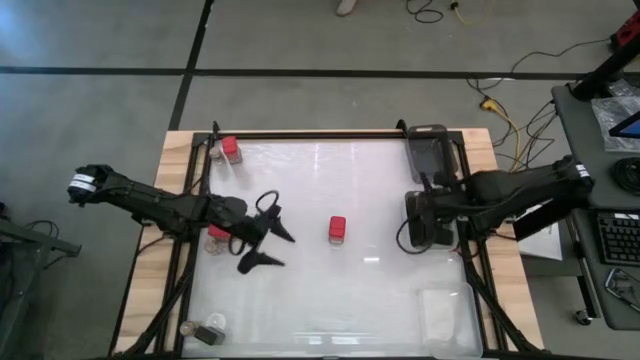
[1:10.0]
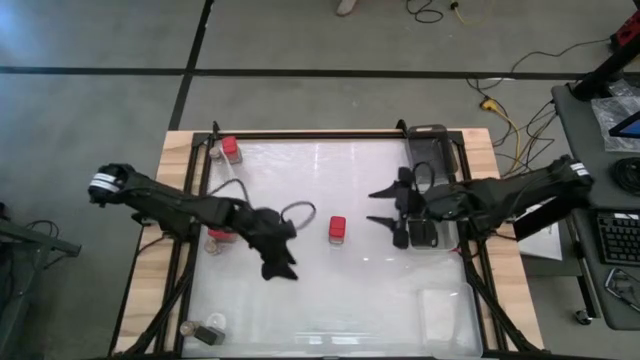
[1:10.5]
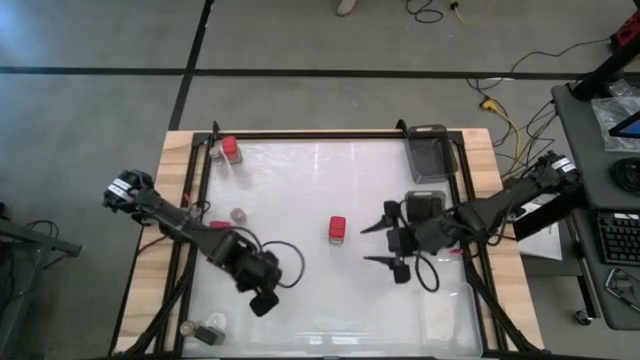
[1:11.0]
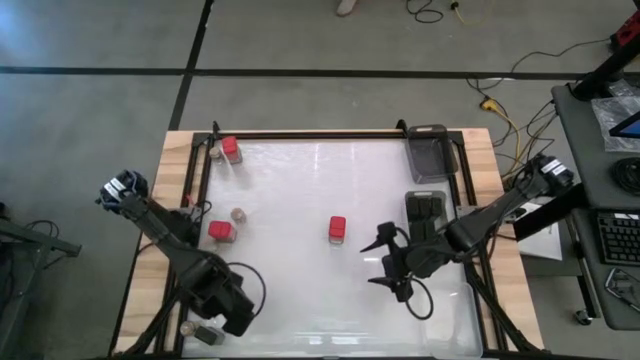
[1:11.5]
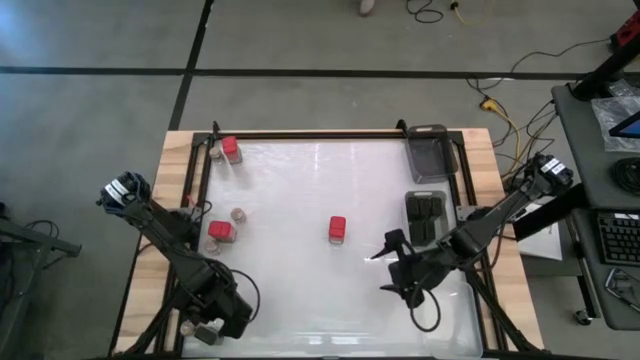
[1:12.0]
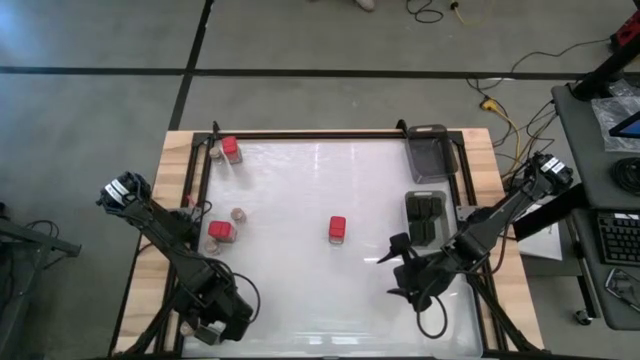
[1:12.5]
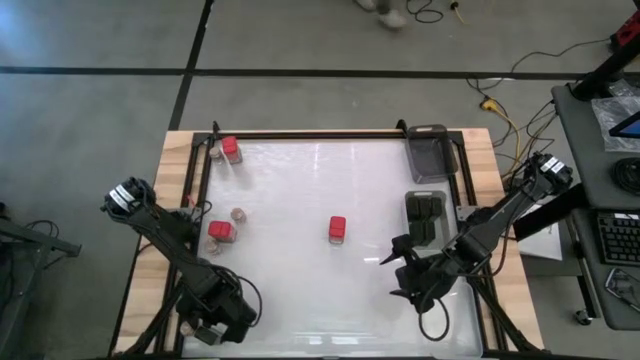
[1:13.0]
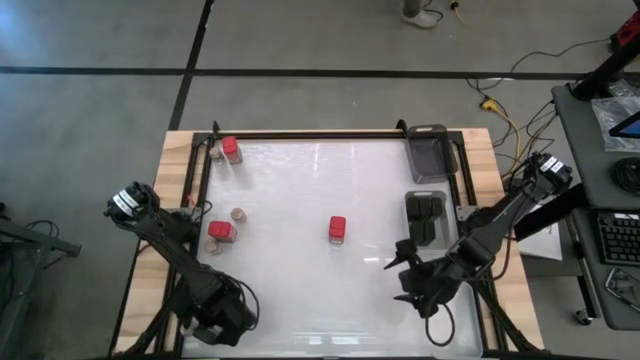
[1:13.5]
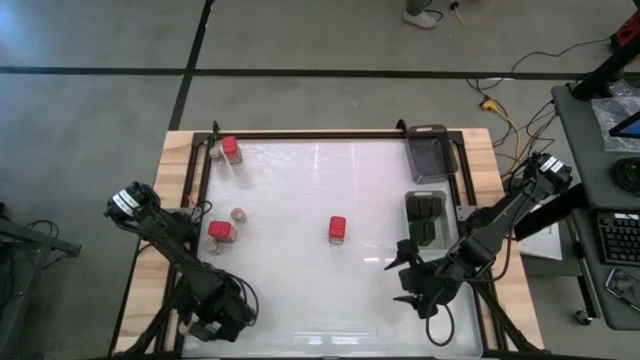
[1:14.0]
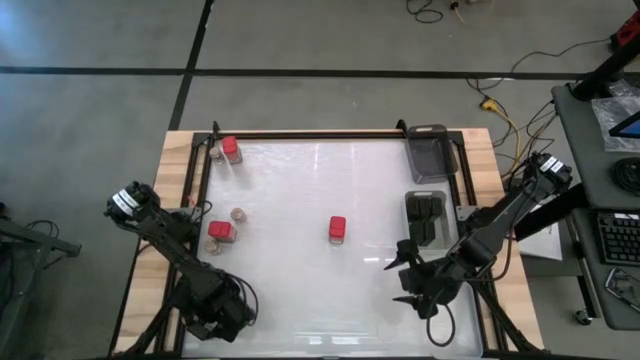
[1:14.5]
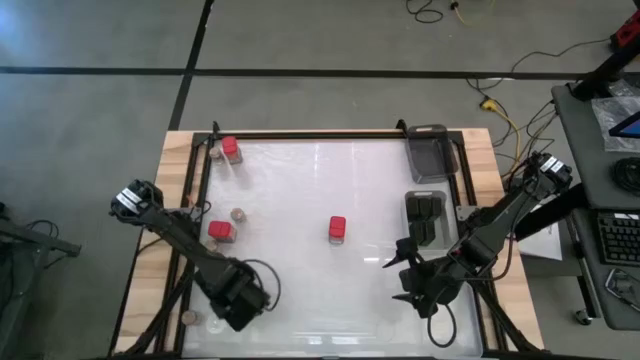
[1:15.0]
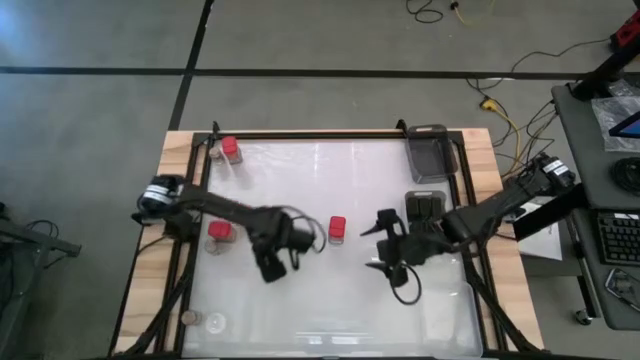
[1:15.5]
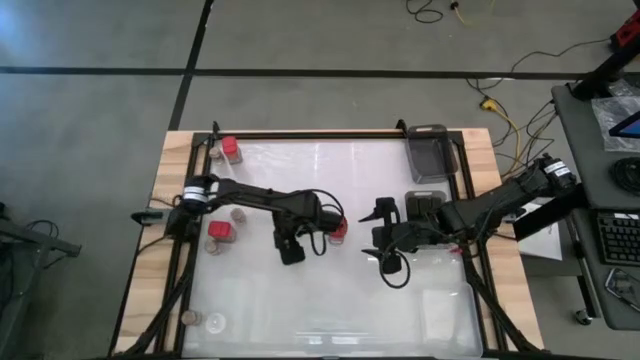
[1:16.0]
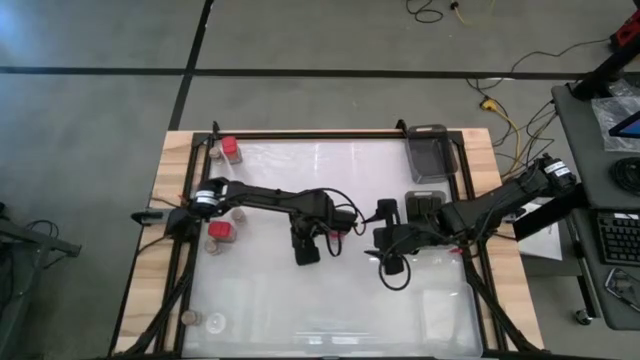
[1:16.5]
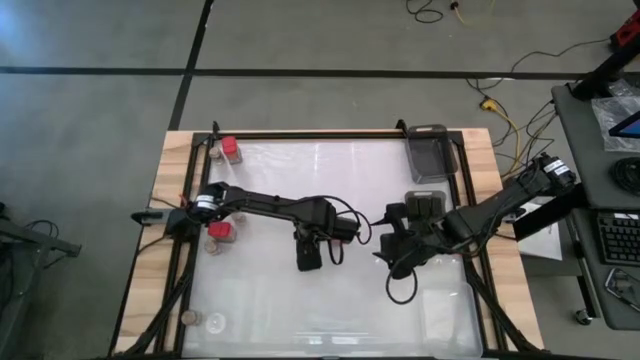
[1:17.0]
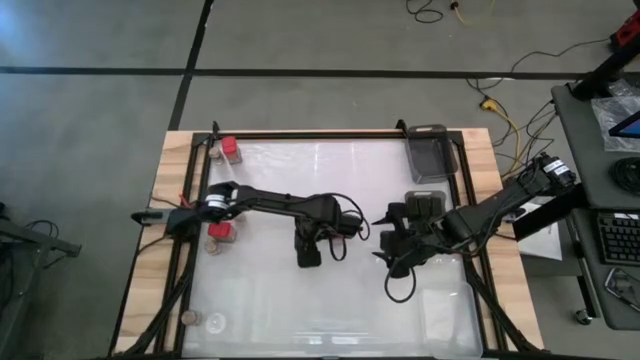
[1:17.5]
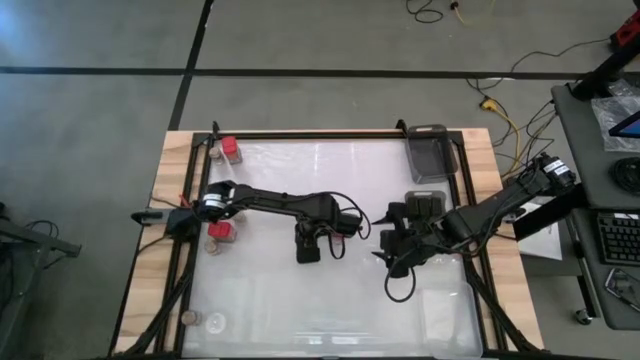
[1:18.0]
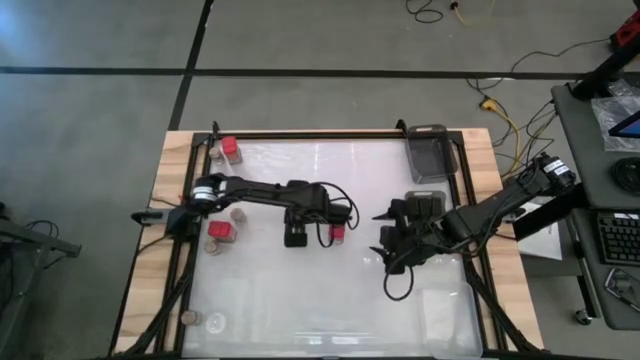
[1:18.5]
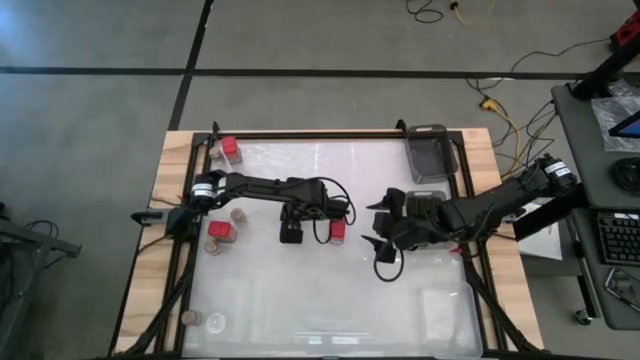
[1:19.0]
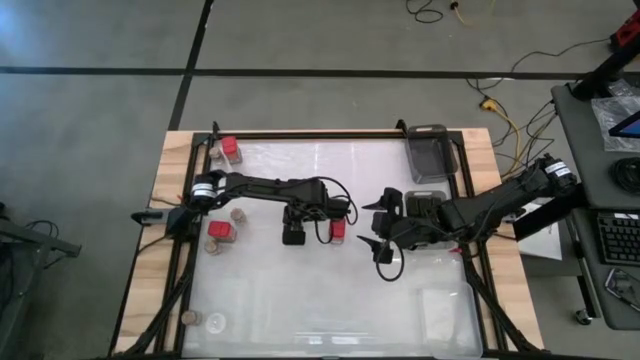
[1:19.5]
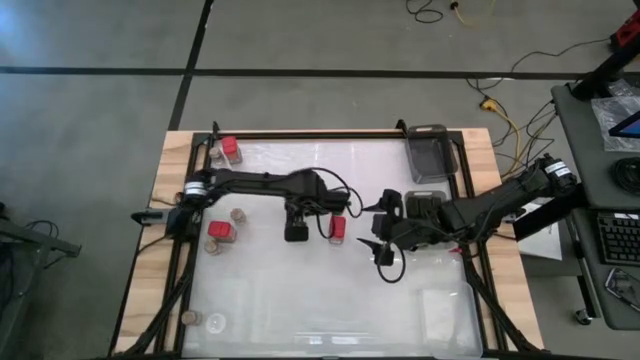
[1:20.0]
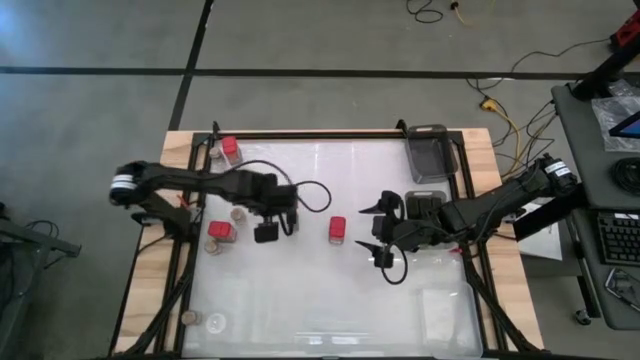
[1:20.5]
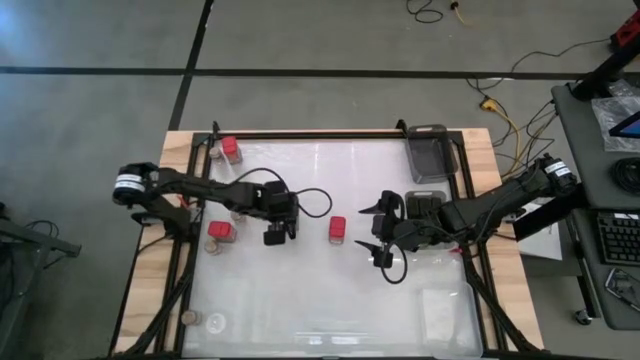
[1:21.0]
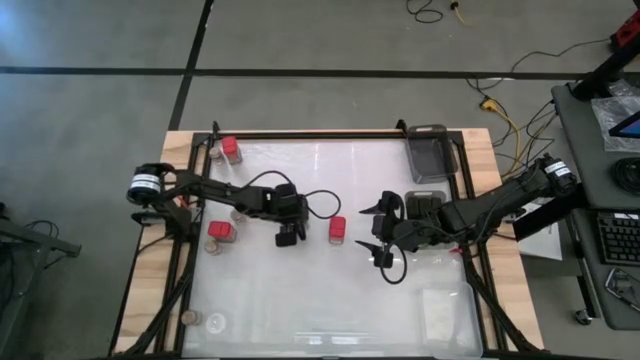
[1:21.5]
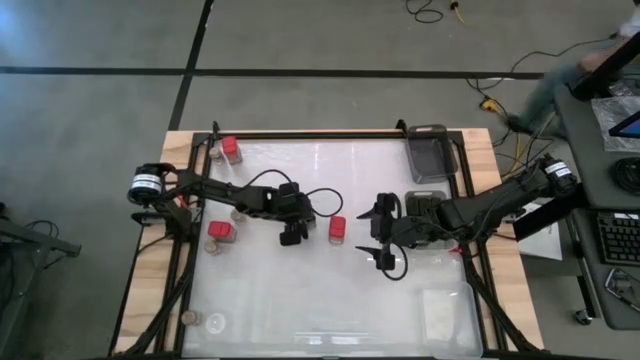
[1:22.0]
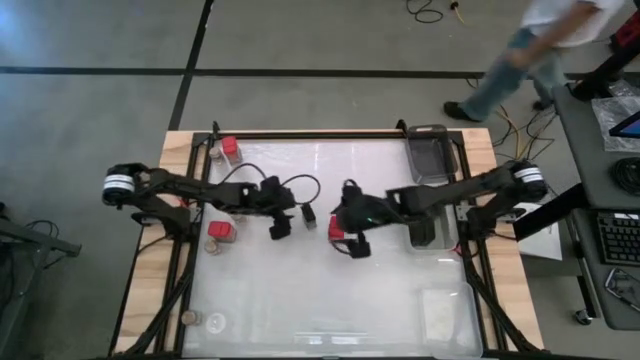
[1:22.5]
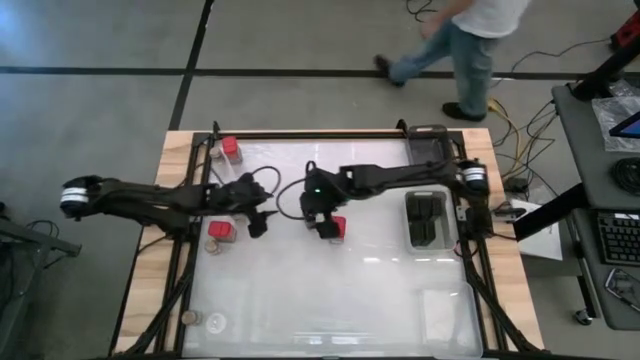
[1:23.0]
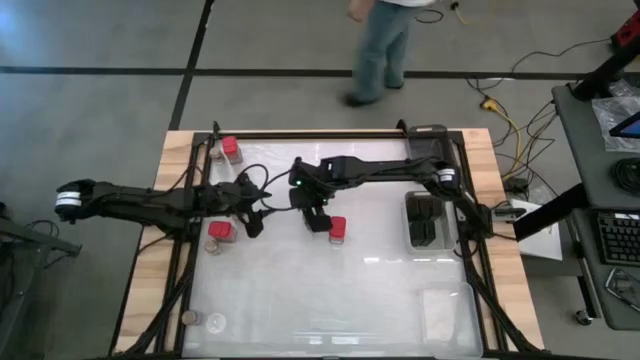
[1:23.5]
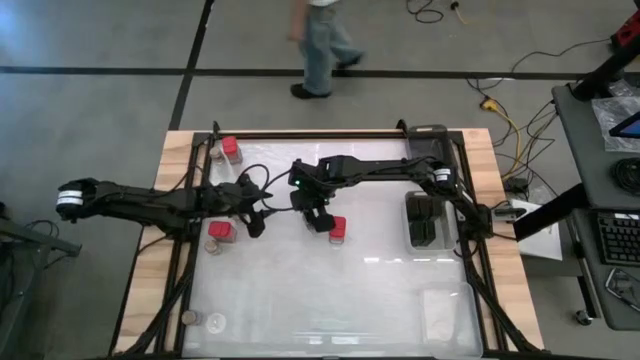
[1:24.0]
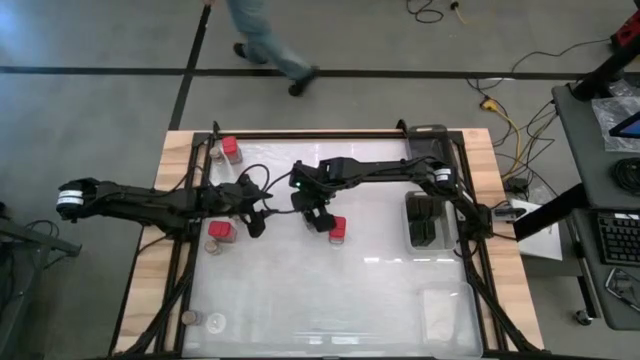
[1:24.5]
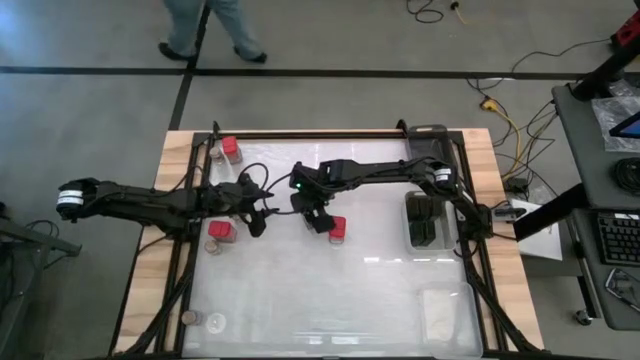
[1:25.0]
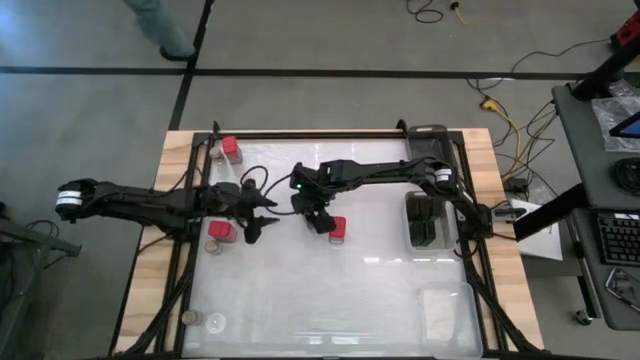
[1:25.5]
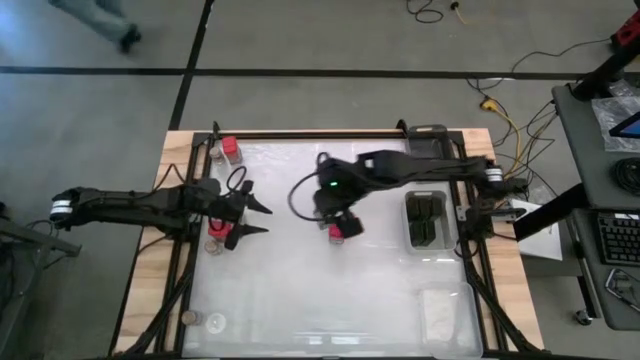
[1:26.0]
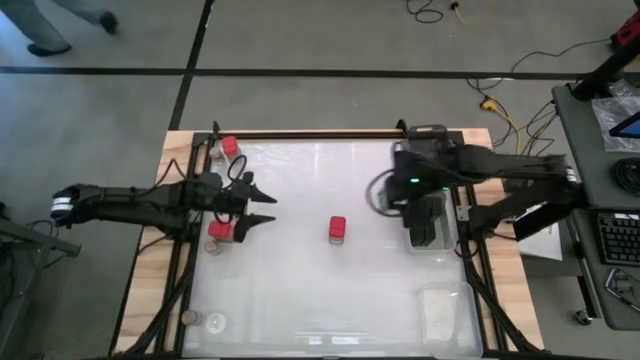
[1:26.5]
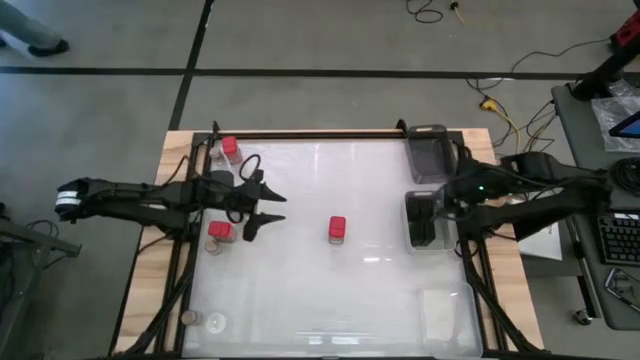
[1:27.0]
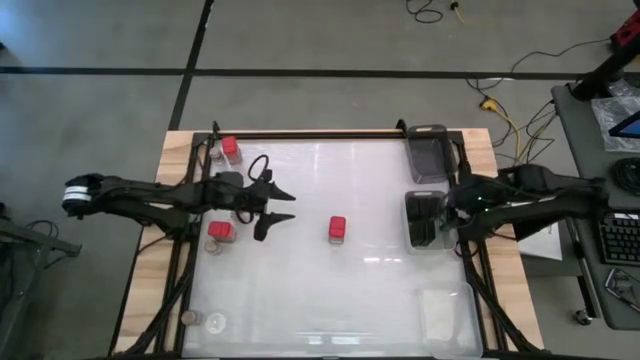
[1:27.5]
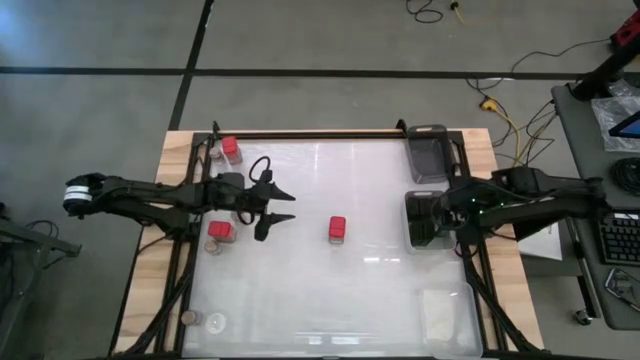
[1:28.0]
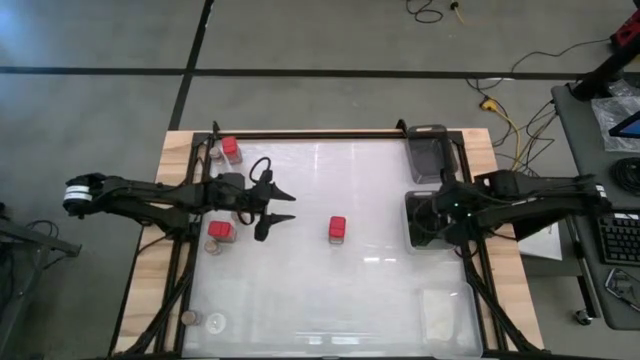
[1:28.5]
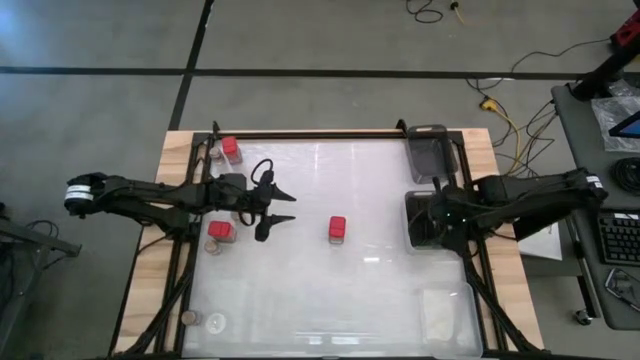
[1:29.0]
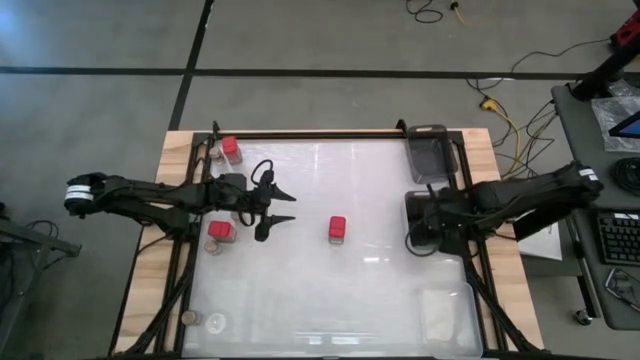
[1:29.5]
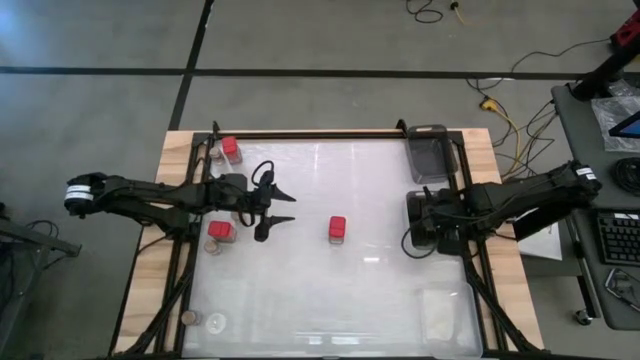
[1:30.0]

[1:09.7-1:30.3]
Task: Sort spices by type
Put the green seasoning can into the gray bin

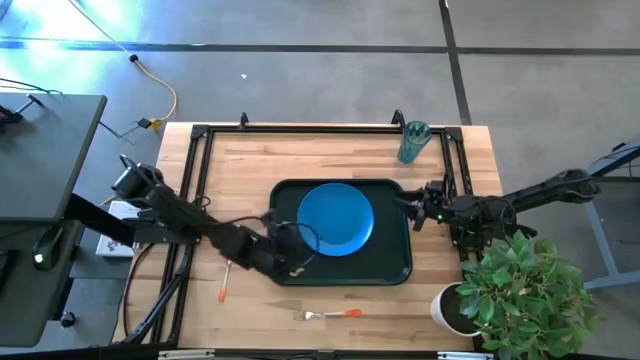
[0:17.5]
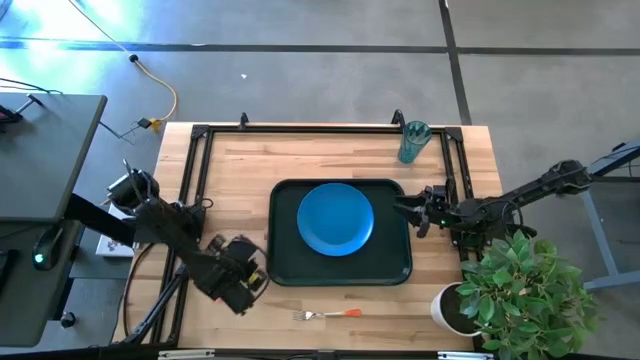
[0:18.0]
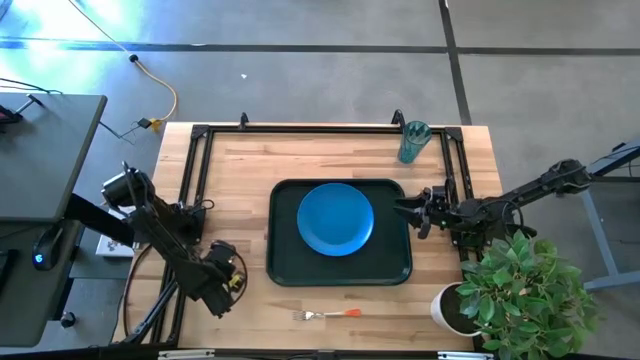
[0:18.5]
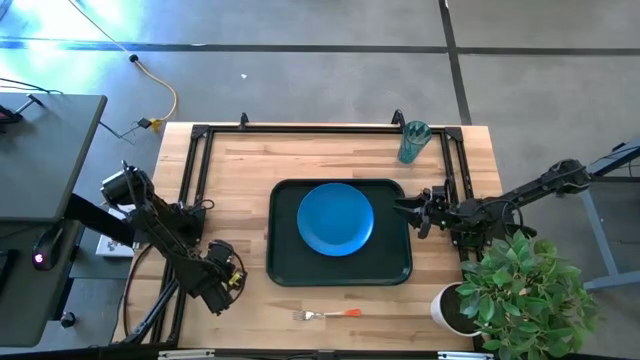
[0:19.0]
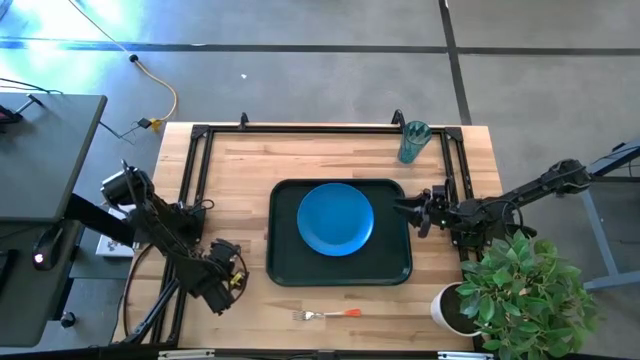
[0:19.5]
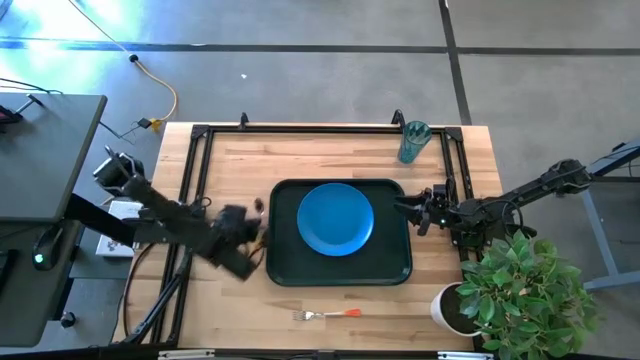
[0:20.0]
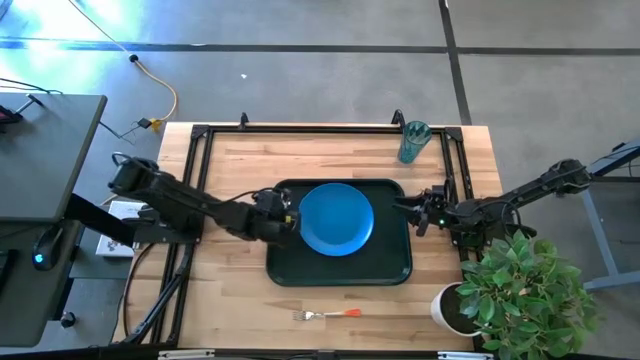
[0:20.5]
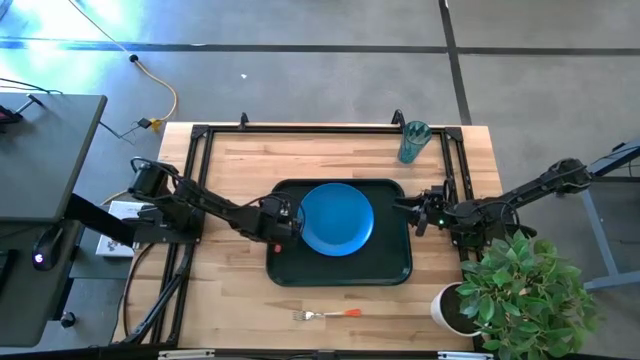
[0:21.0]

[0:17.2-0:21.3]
Task: Pick and place plate/cup/fork/spoon on tray
Put the orange spoon to the left of the blue plate on the black tray
